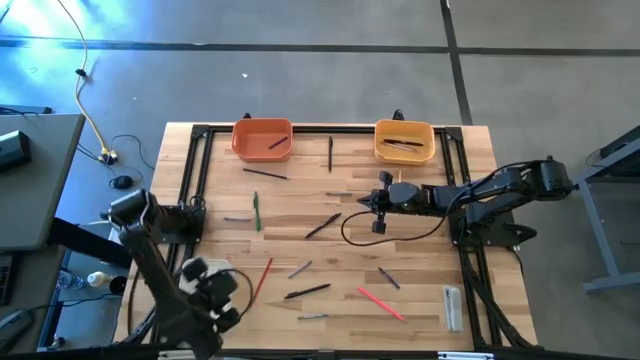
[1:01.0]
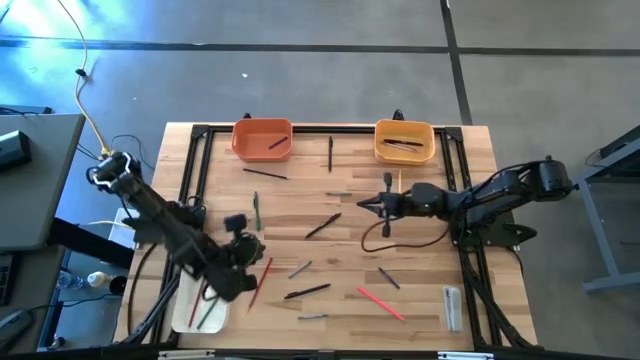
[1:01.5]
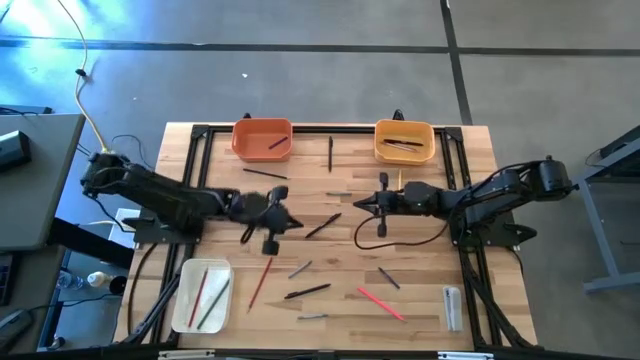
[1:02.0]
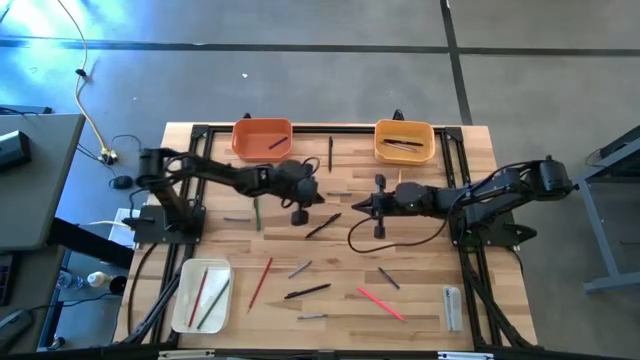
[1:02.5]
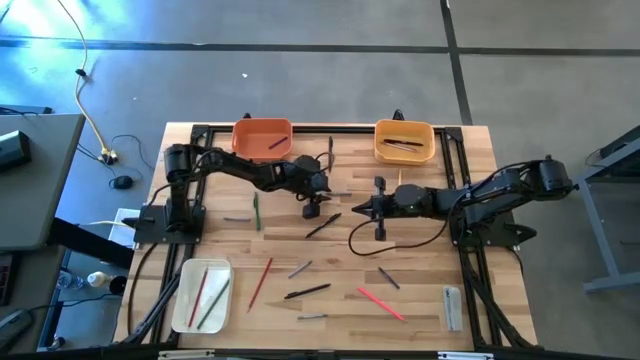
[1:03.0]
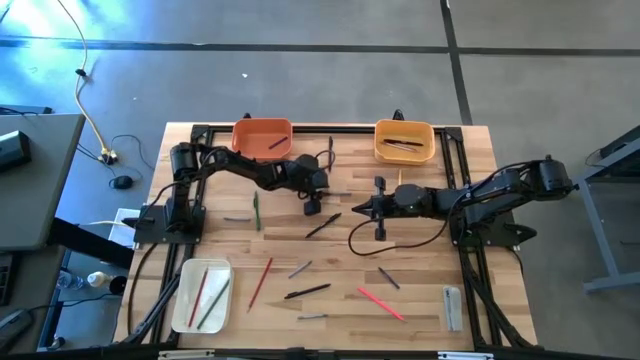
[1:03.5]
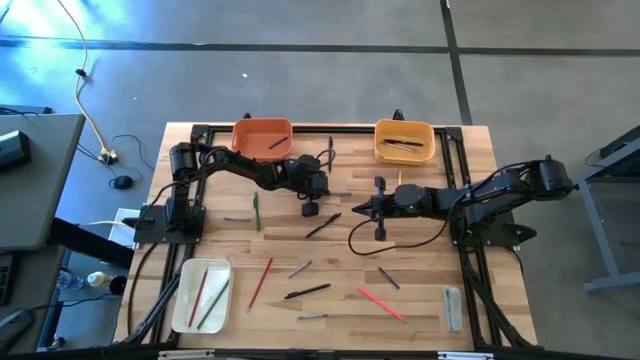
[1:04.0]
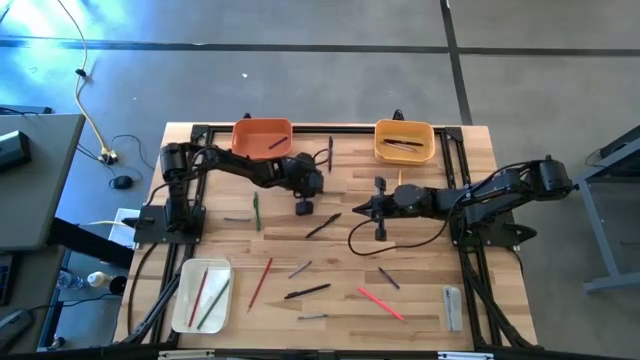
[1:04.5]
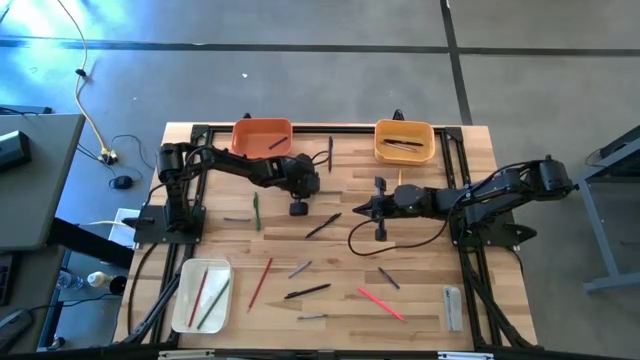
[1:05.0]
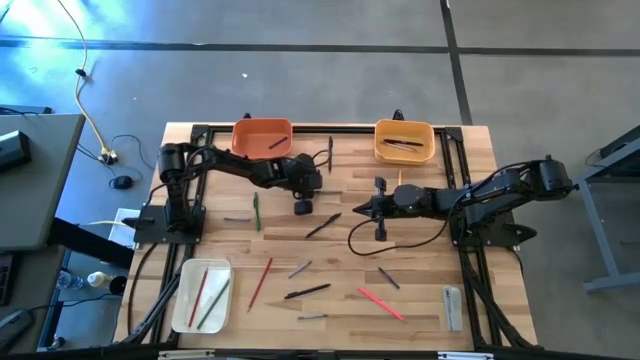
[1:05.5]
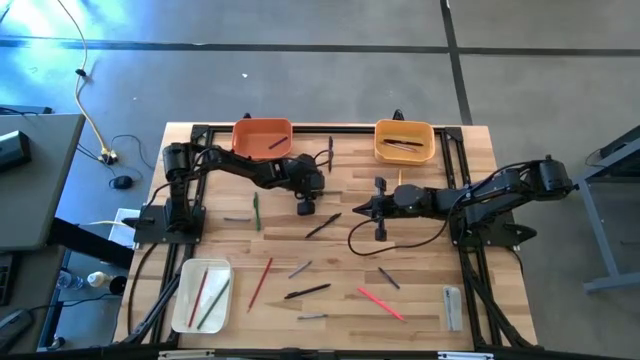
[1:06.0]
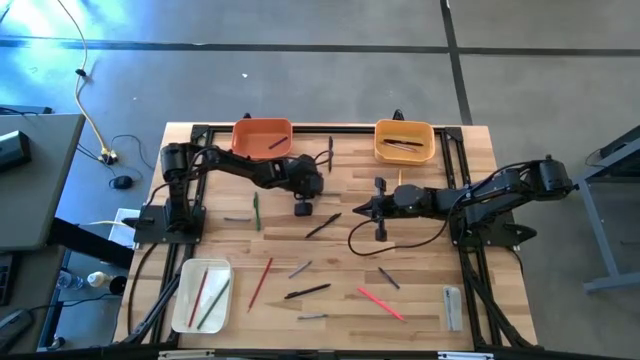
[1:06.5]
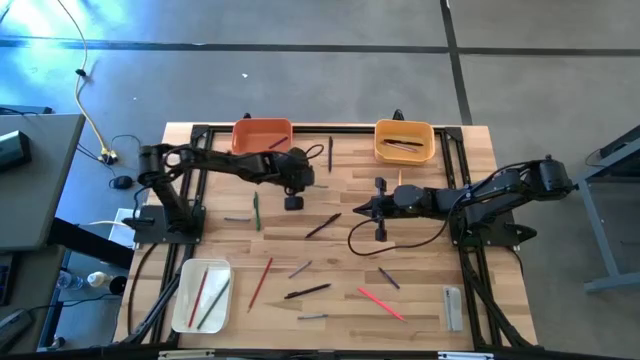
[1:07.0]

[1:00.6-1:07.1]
Task: Sort crayons/erasers/pens/pencils in bins
Put the gray crayon into the orange bin

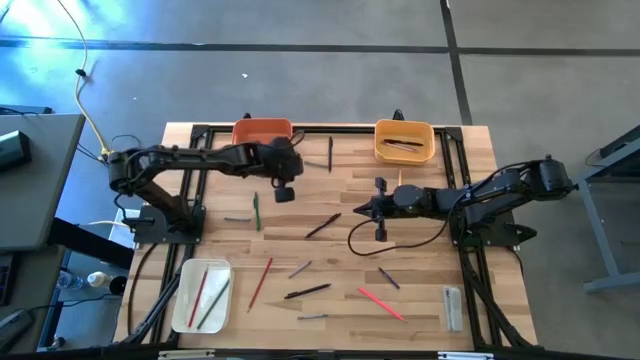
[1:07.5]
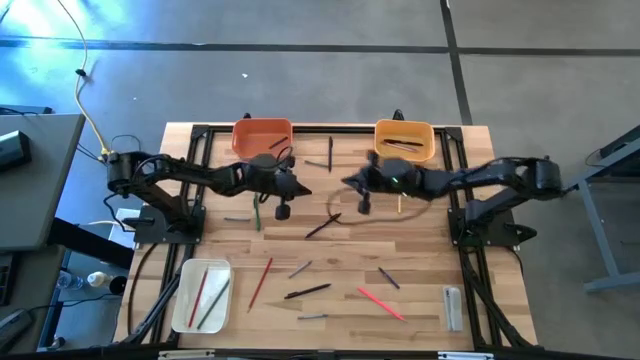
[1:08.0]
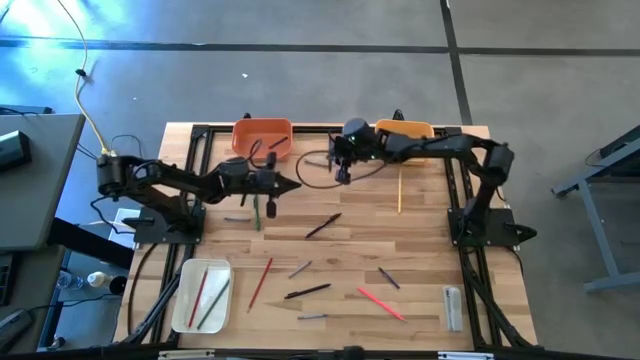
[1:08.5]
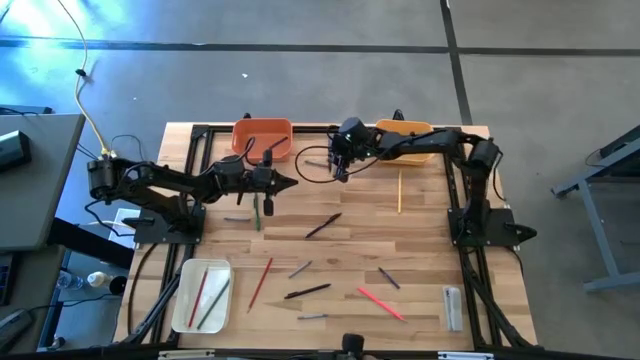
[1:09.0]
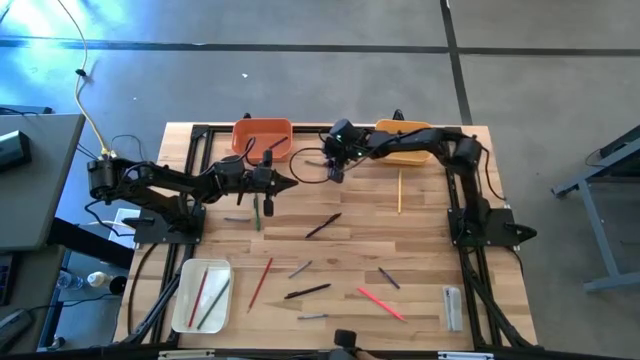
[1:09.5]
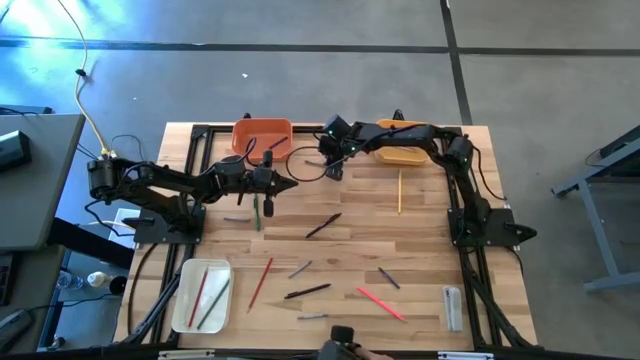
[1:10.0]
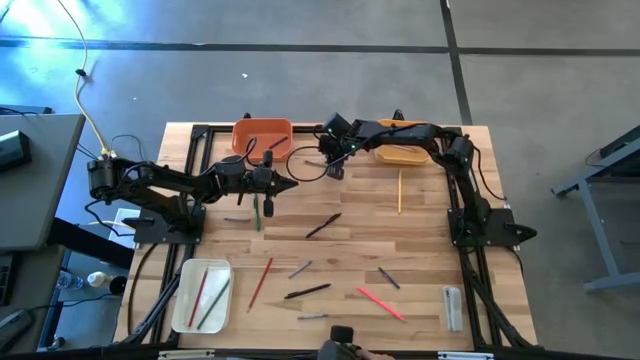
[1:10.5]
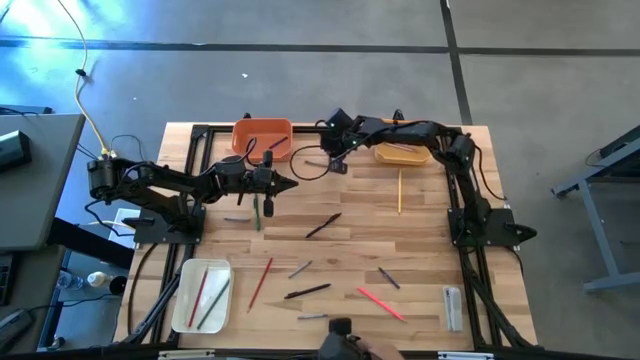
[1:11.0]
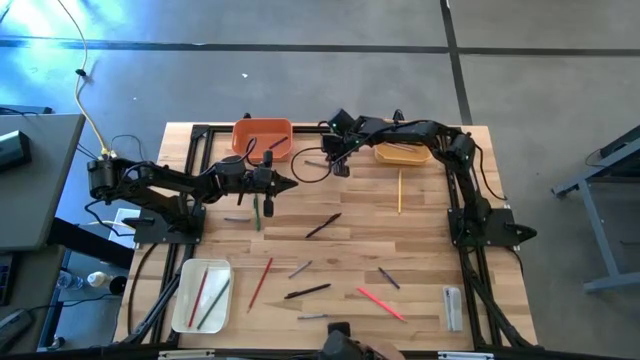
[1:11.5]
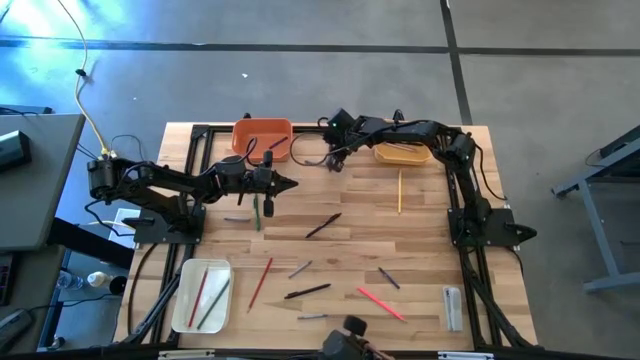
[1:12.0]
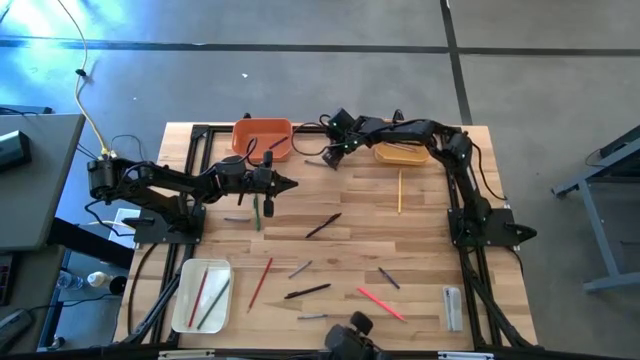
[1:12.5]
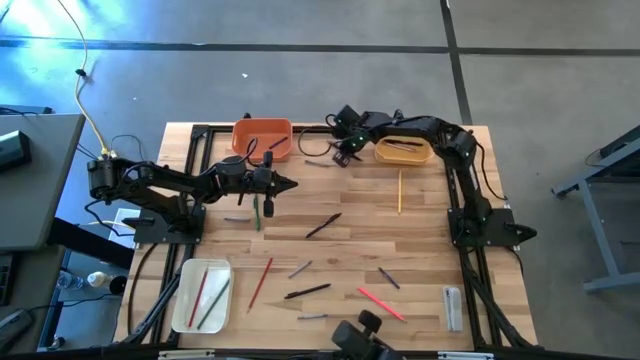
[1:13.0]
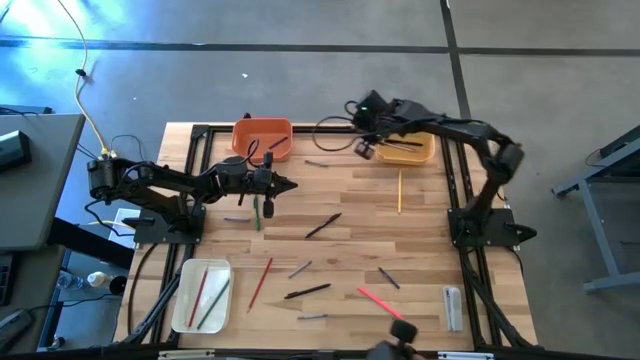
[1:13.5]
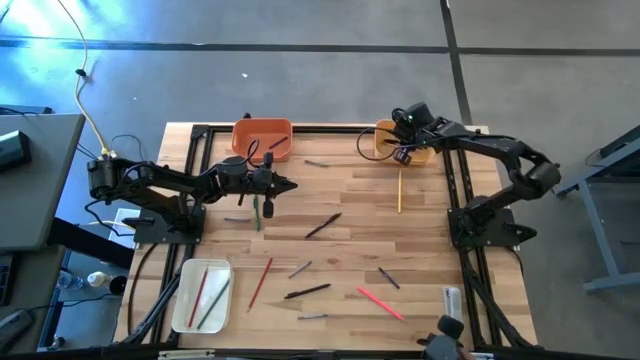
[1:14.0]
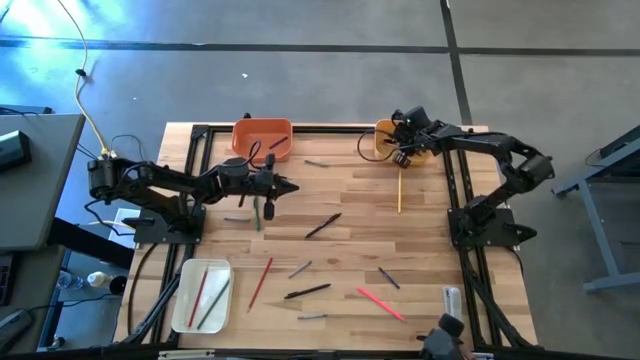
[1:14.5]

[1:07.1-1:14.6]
Put the black pen into the yellow bin

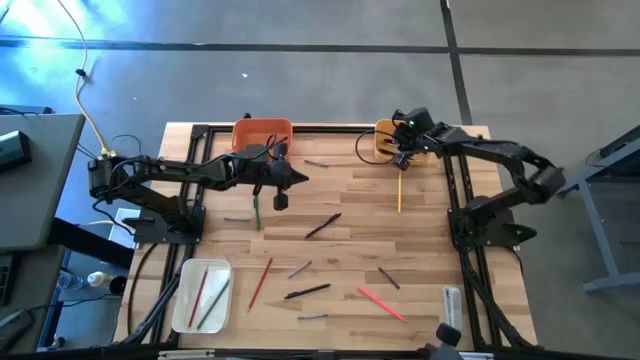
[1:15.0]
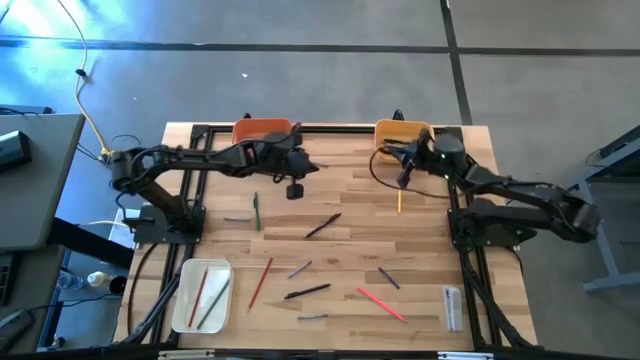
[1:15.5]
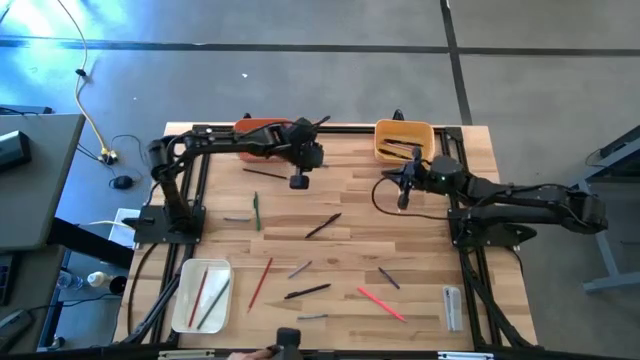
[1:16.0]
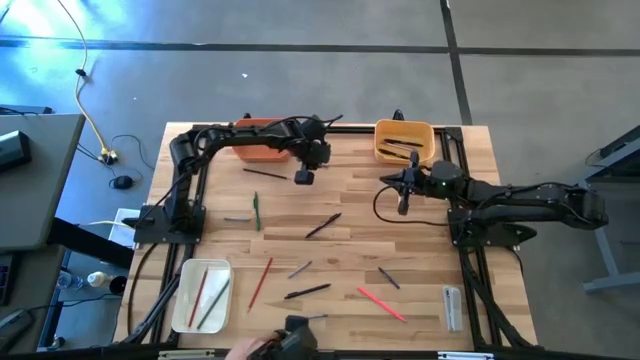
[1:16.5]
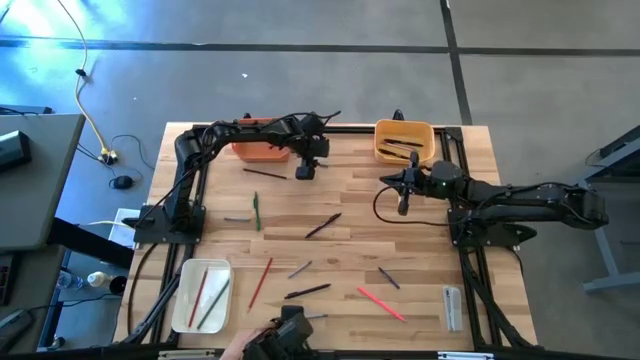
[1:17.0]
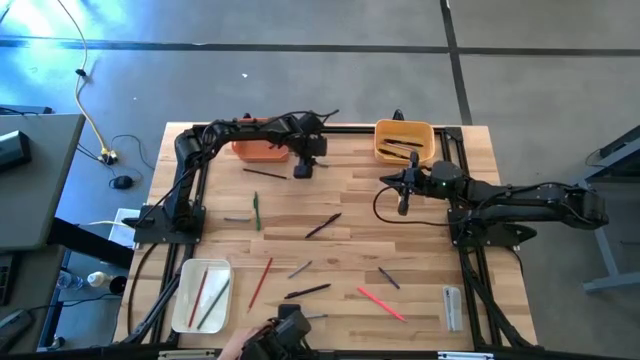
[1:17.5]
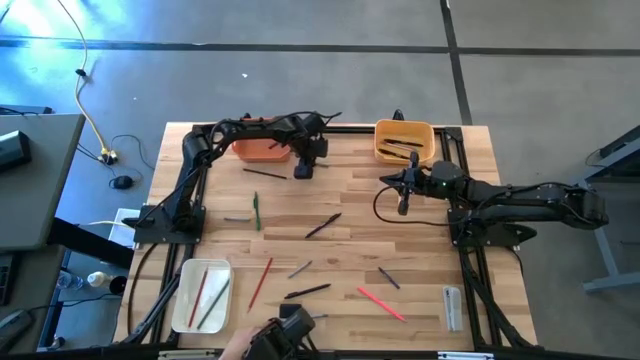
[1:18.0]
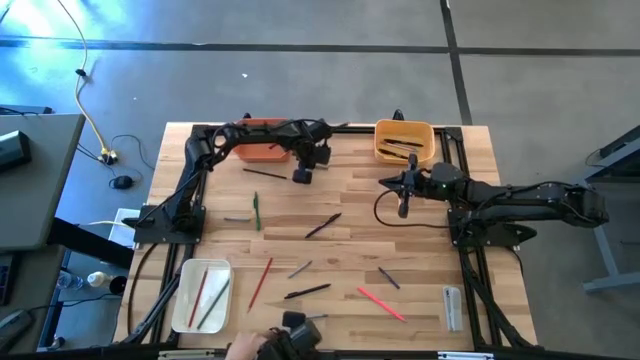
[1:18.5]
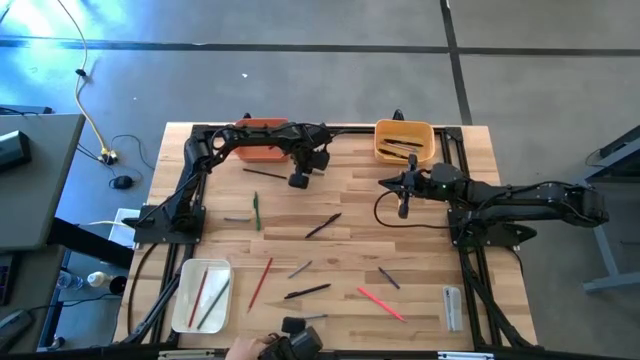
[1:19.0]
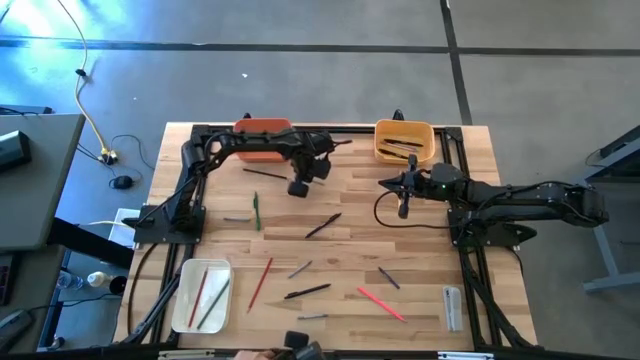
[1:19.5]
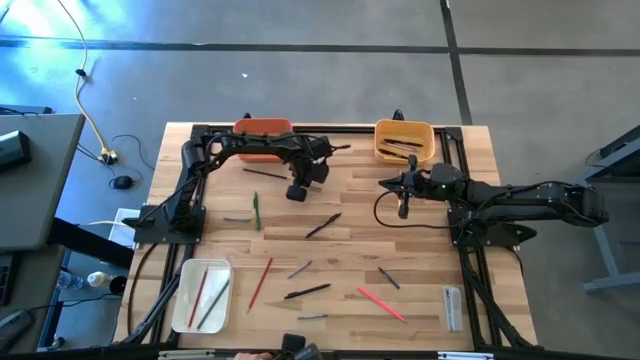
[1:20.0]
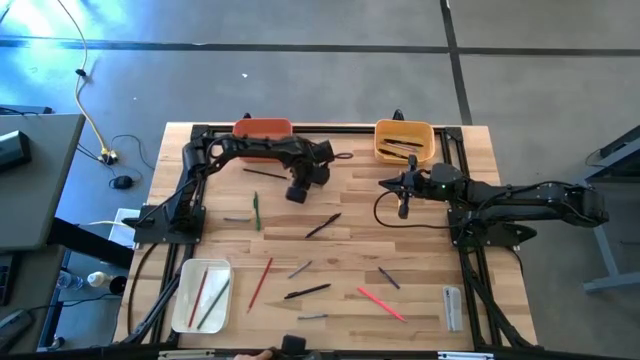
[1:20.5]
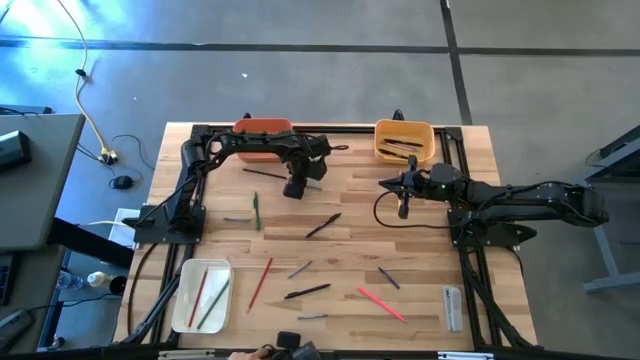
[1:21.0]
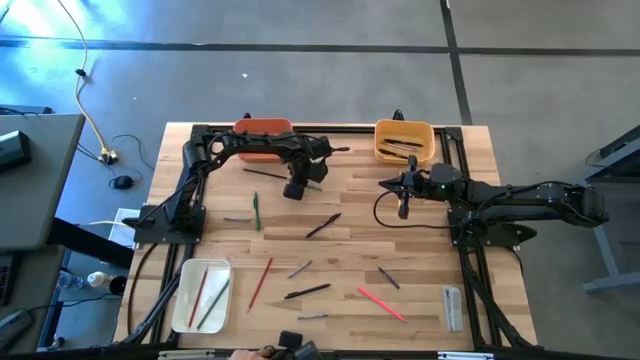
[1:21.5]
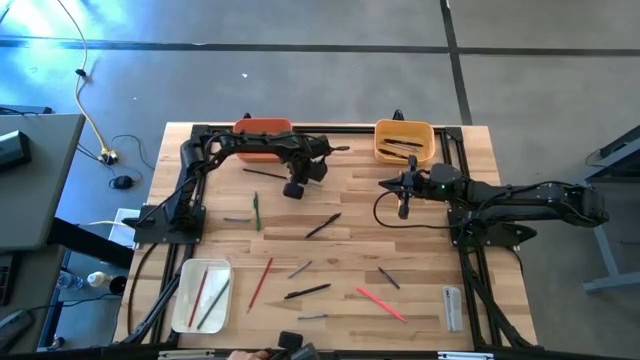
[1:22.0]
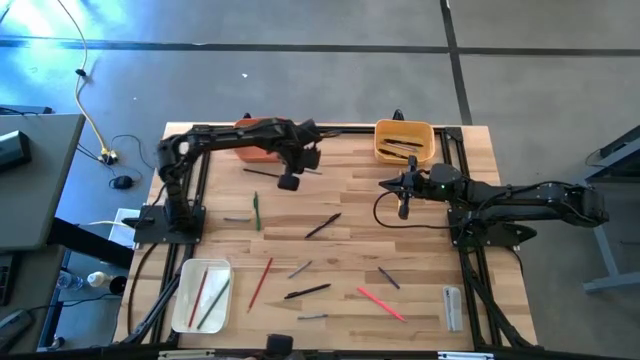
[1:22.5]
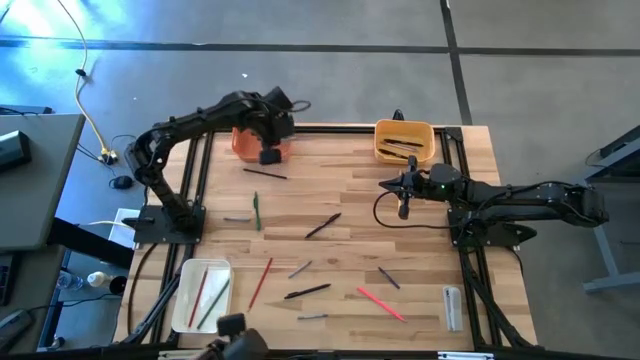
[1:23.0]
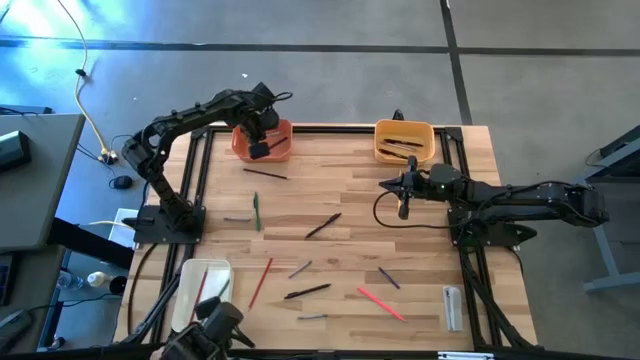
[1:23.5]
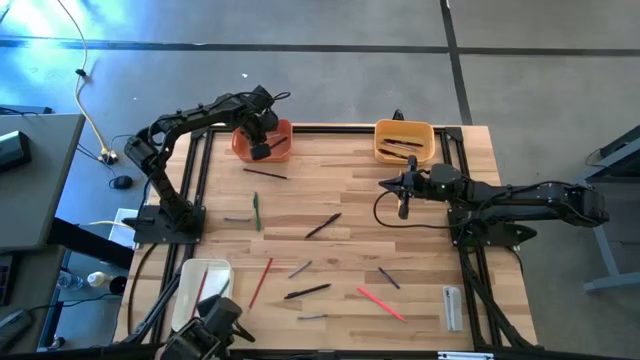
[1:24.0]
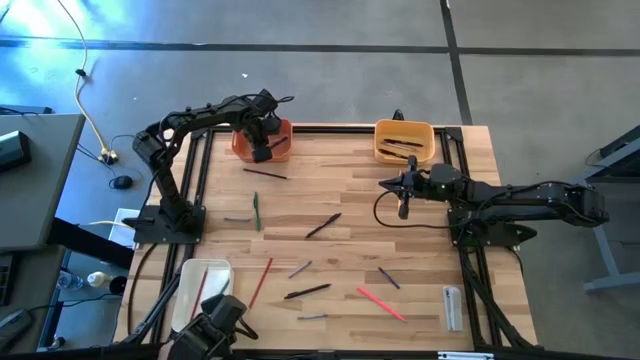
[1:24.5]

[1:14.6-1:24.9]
Put the gray crayon into the orange bin
